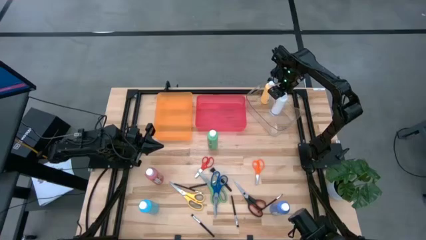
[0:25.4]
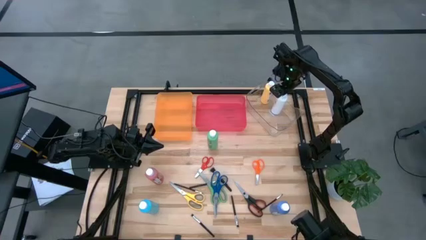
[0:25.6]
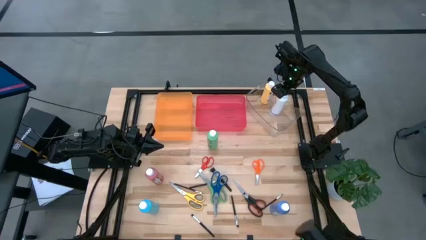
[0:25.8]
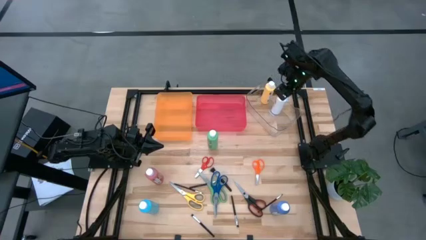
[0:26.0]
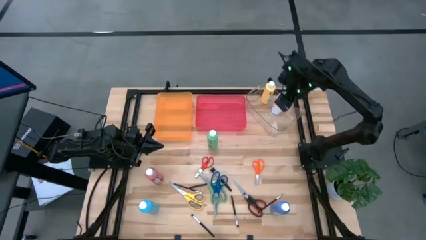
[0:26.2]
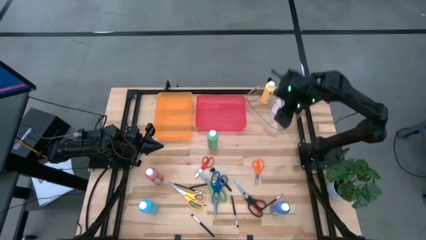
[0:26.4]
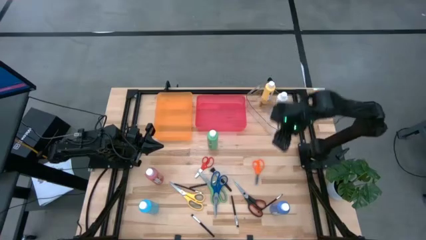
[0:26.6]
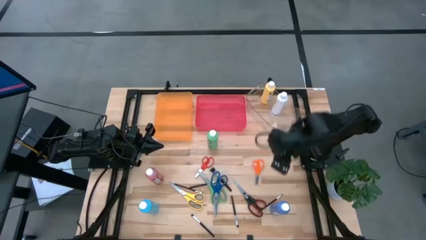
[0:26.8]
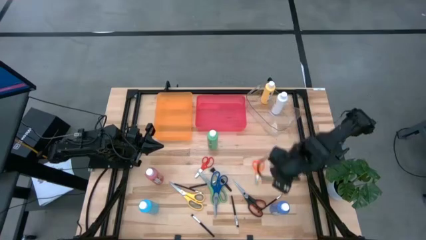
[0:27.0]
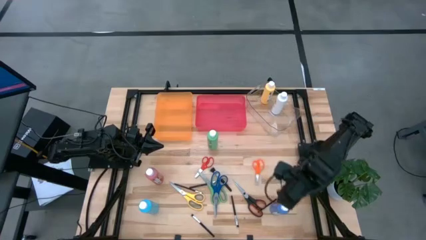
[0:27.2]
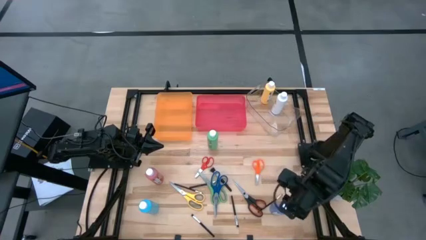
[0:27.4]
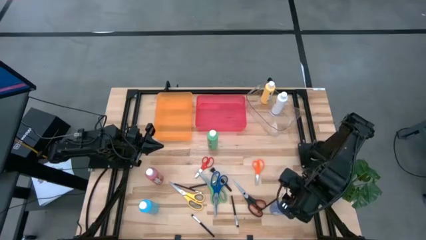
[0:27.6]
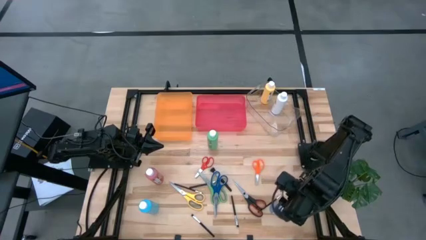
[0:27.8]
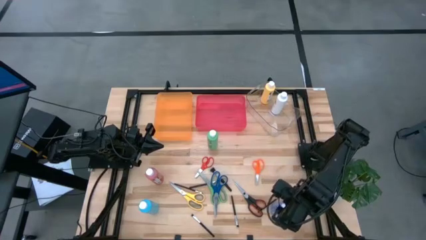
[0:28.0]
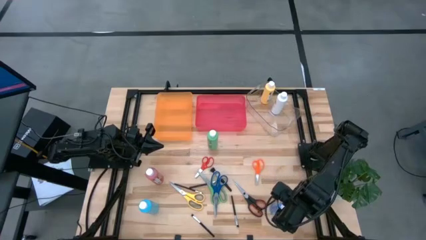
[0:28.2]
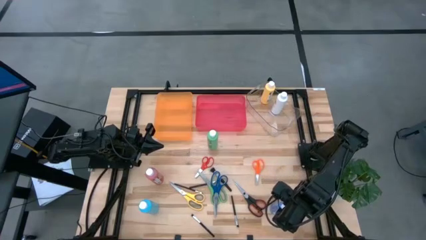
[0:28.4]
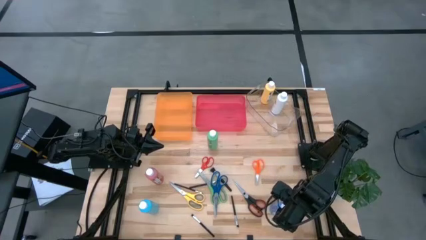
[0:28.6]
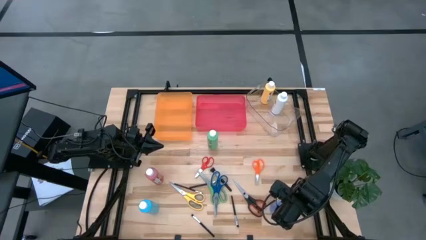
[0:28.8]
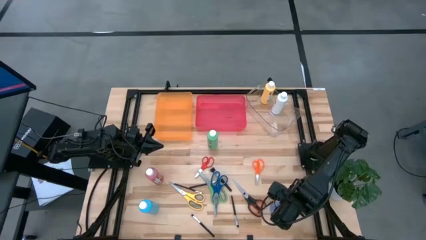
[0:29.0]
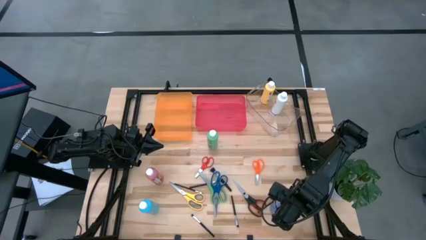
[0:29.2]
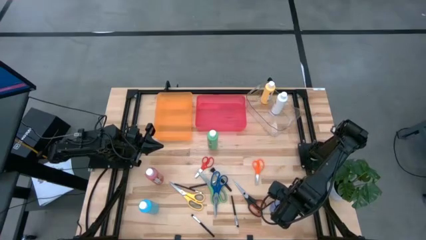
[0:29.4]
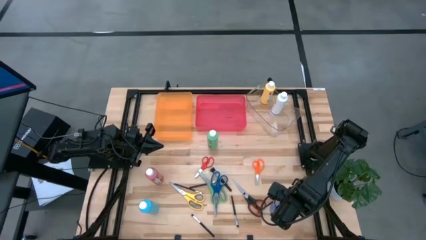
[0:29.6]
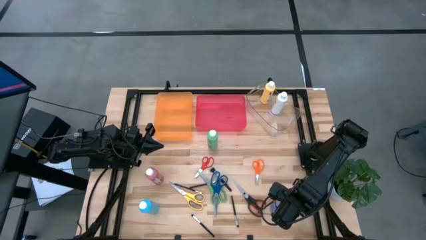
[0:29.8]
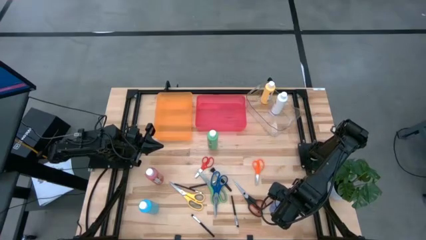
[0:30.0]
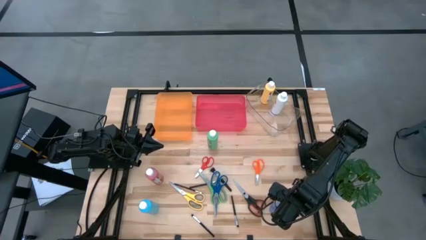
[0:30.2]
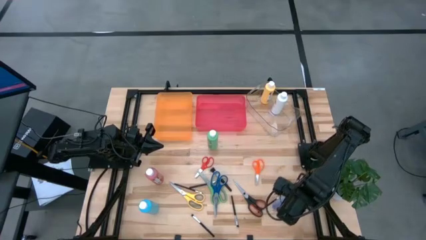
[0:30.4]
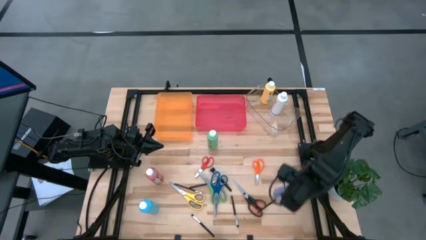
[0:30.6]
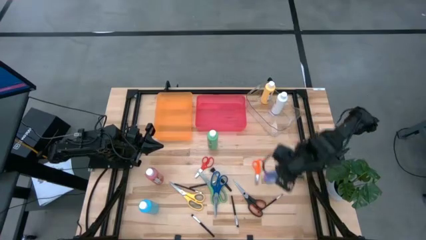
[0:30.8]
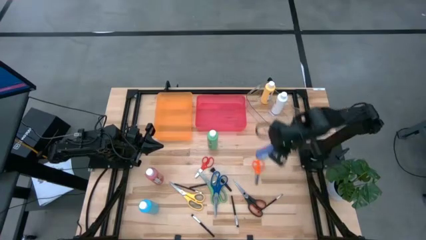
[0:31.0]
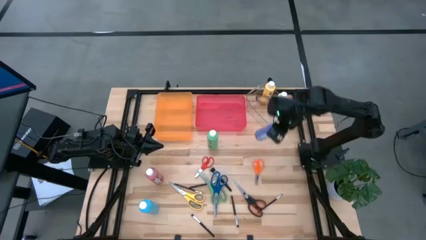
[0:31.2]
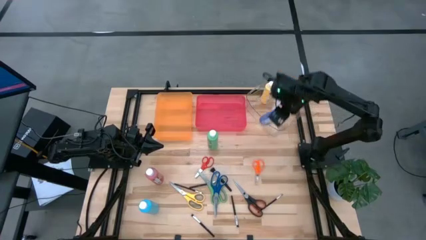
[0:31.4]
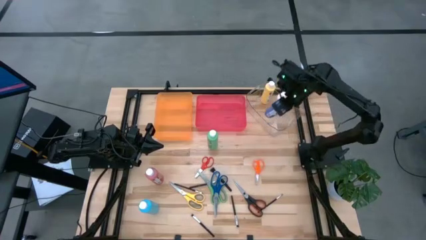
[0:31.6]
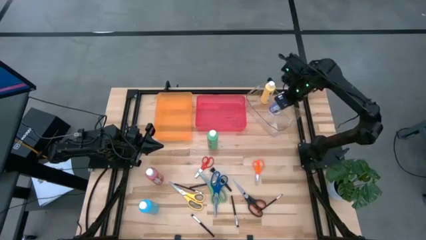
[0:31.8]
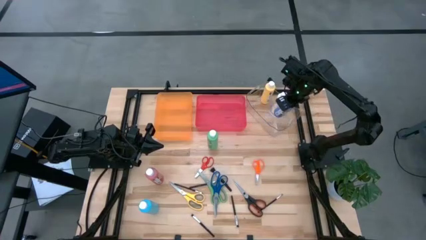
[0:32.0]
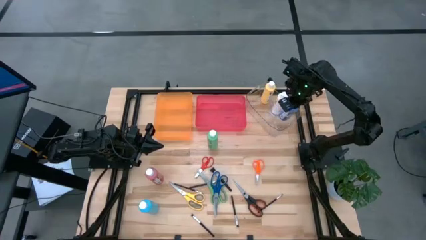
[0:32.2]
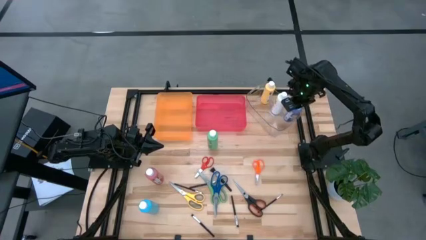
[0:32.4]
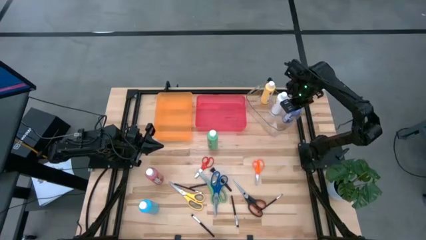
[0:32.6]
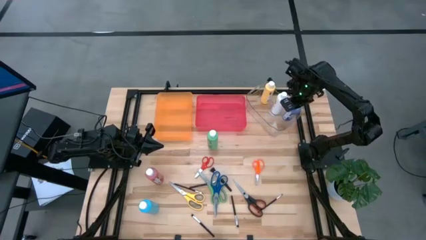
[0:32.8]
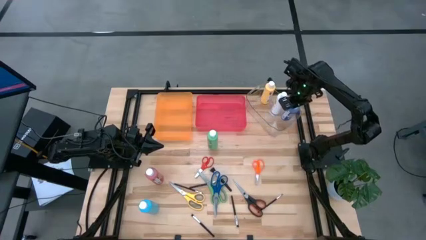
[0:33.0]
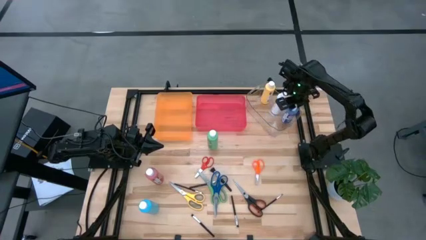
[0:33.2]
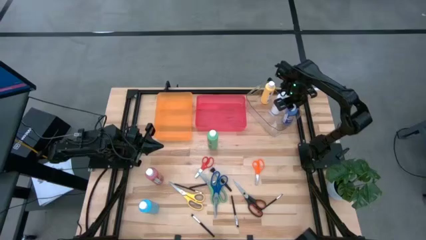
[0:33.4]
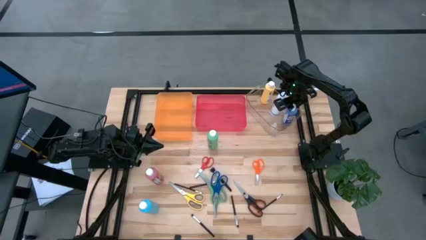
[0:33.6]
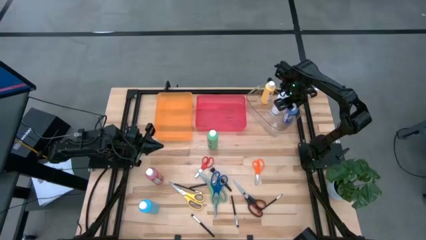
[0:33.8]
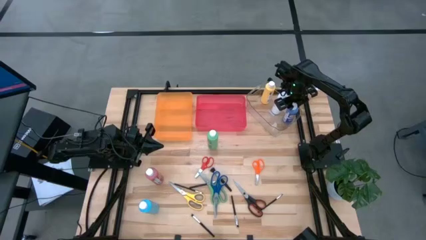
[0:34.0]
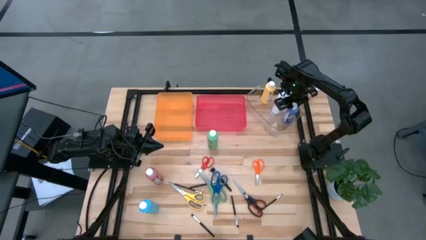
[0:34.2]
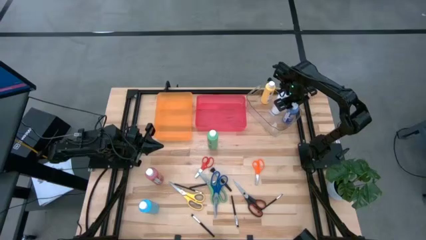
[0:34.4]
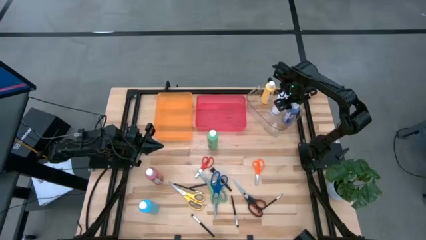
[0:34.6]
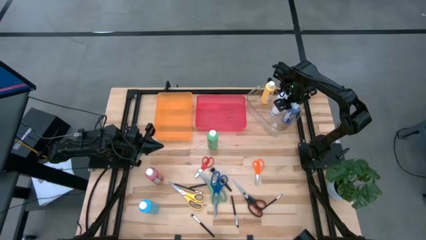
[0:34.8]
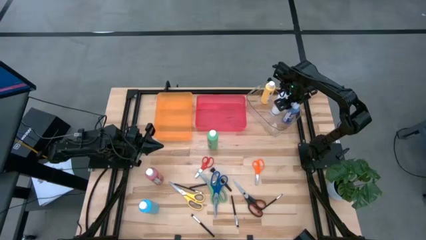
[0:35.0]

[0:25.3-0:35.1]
Task: Pick & Place Paint Supplies
Put the violet paint bottle into the transparent bin

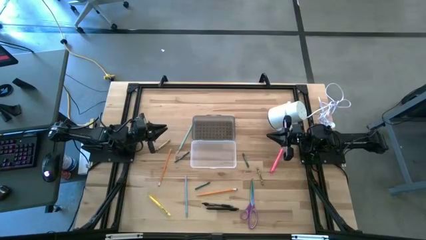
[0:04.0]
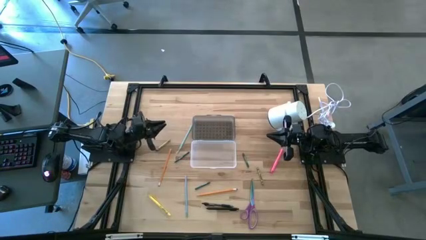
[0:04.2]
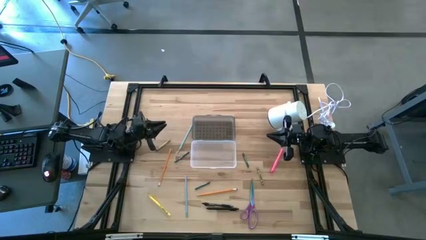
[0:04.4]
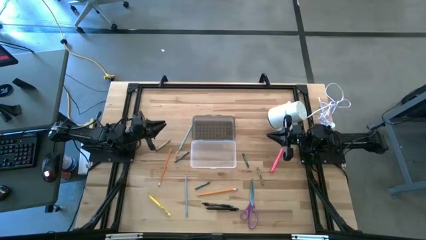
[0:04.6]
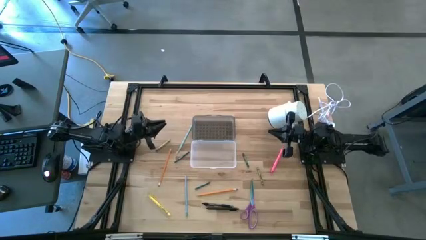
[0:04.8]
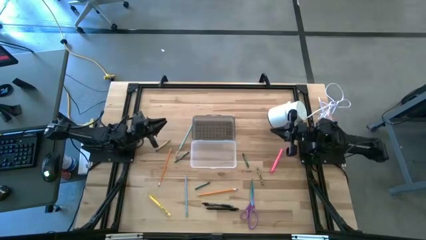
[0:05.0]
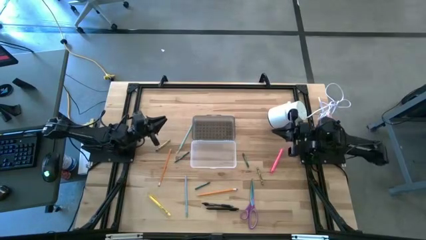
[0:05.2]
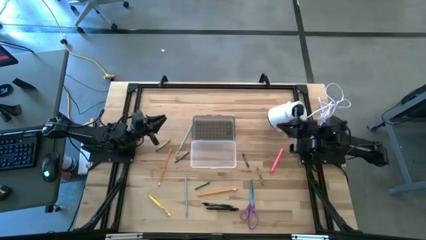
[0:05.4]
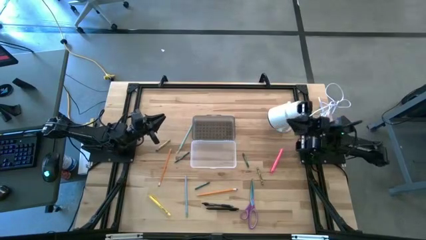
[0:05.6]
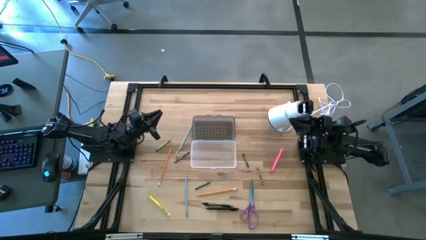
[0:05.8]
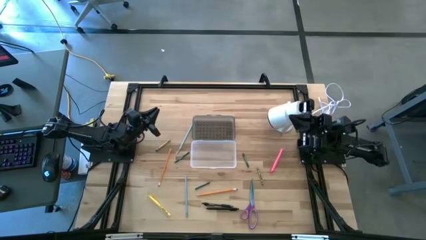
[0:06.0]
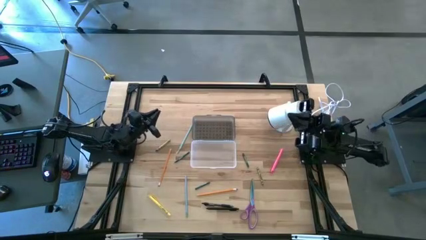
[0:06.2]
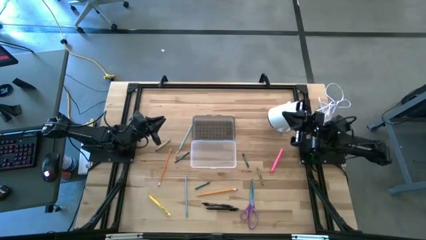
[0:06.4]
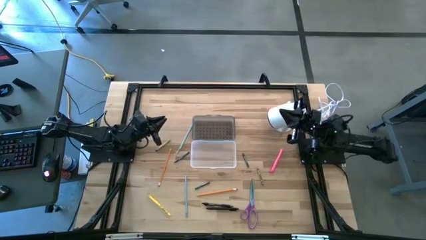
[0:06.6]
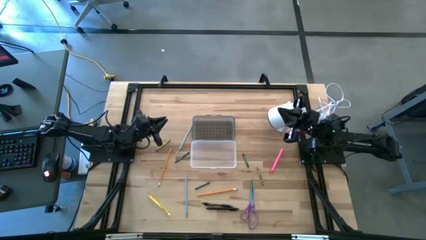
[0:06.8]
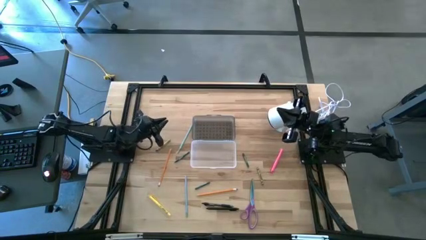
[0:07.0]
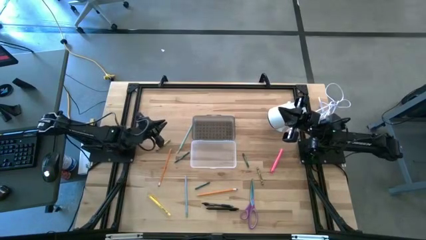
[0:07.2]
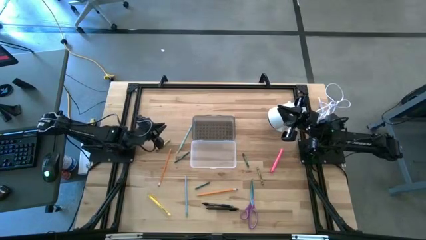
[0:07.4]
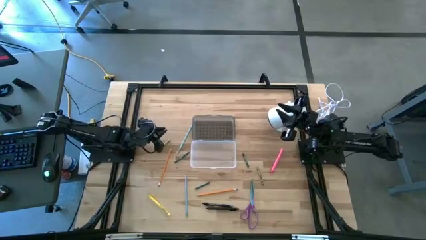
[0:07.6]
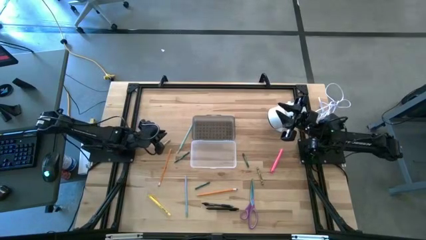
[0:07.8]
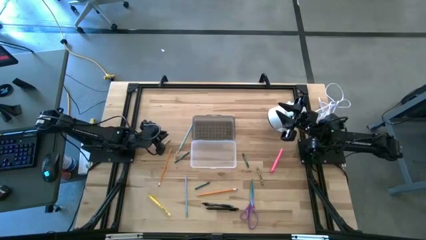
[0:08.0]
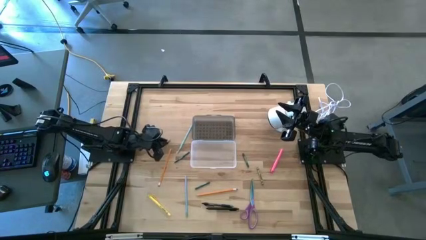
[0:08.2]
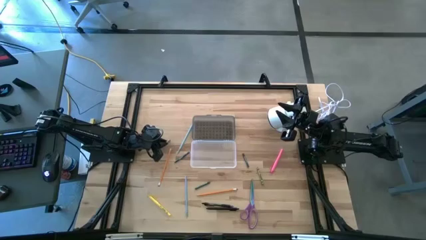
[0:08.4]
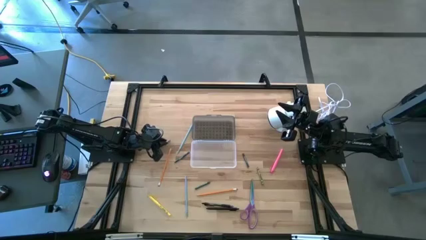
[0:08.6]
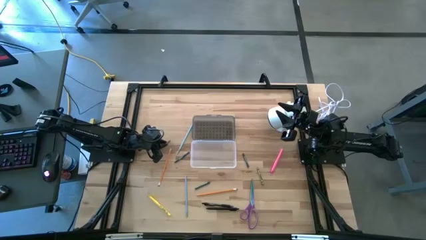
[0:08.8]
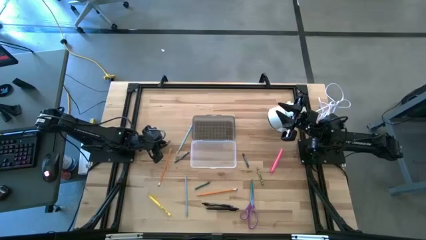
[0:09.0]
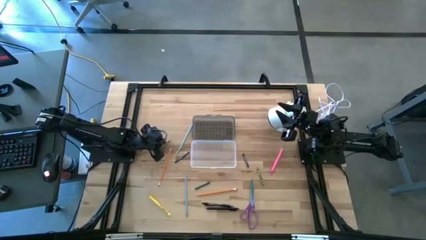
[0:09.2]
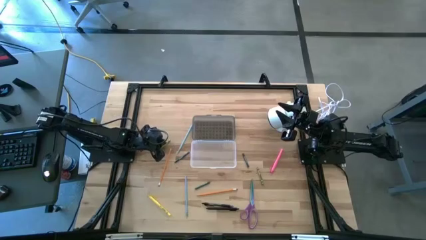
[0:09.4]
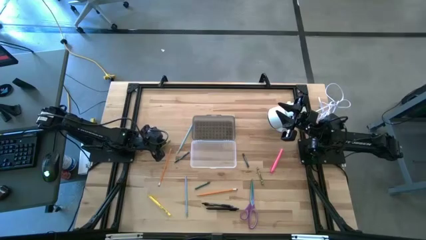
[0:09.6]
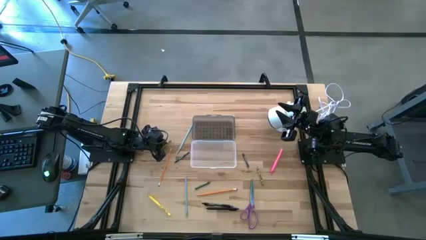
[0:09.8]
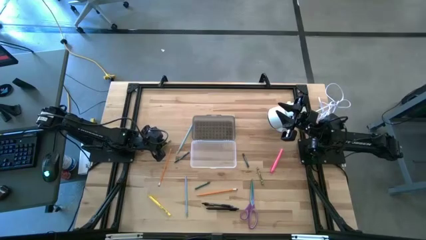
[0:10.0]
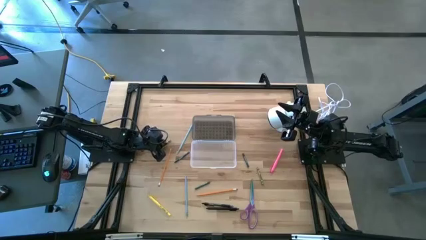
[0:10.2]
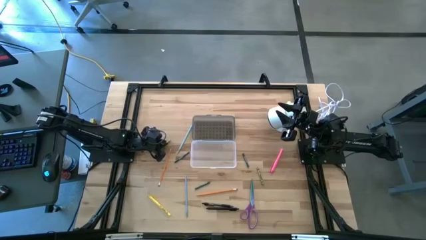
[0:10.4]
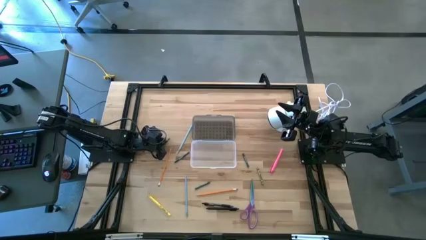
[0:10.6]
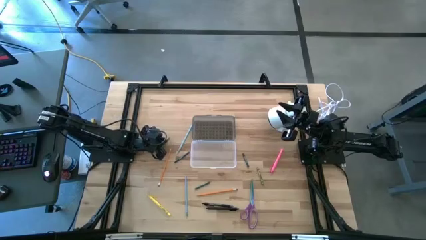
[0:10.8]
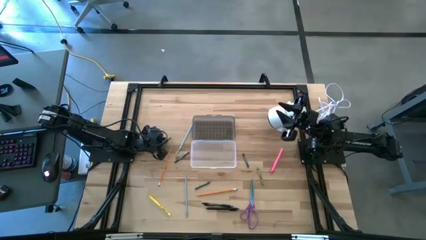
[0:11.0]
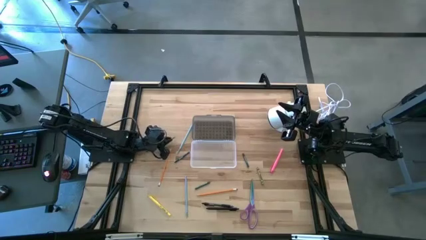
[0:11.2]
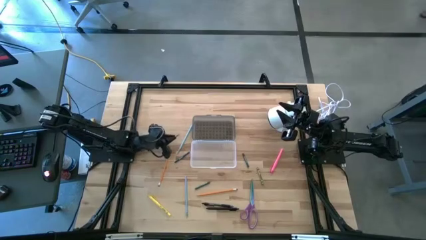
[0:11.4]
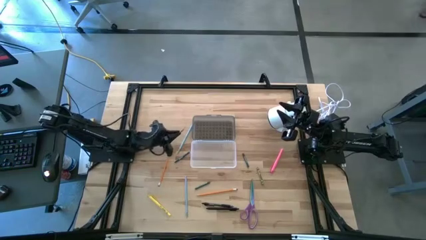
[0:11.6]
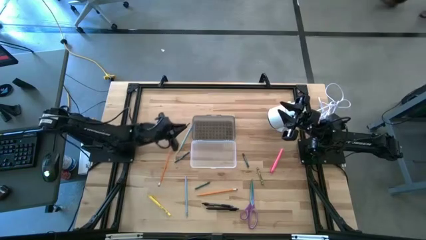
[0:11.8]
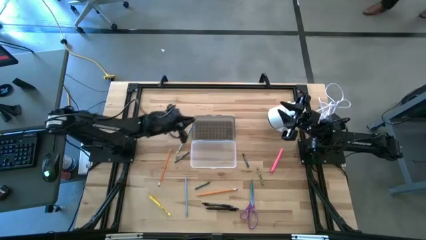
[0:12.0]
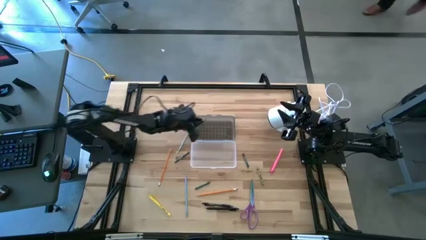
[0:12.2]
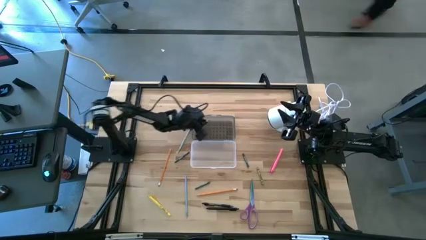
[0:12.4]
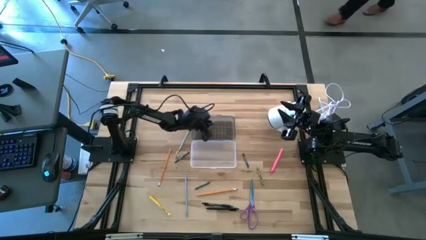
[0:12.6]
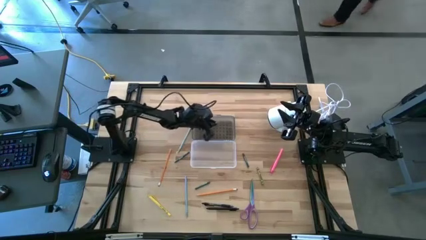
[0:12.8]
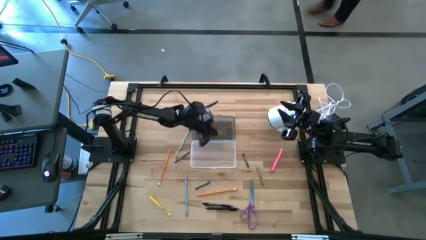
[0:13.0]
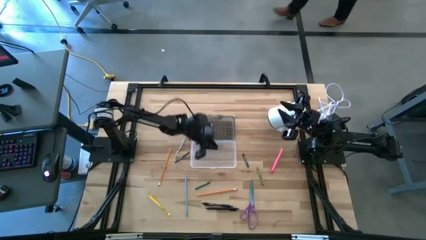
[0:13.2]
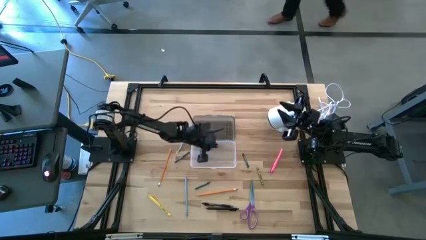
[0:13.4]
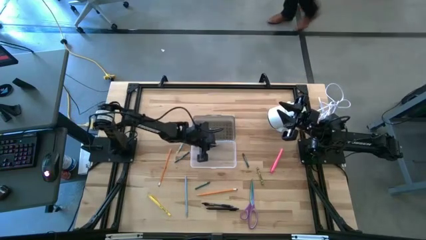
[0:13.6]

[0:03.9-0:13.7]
Task: Pick & place school supplies into a supply box
Put the left light green crayon into the gray supply box
